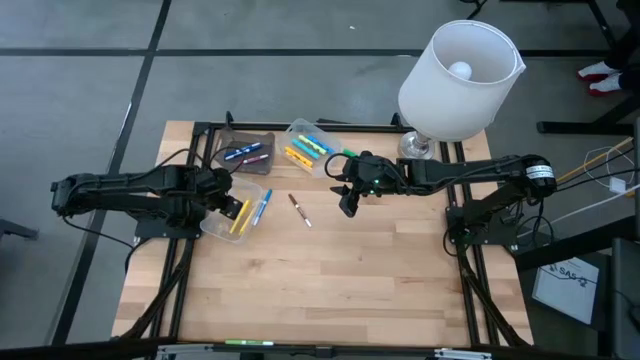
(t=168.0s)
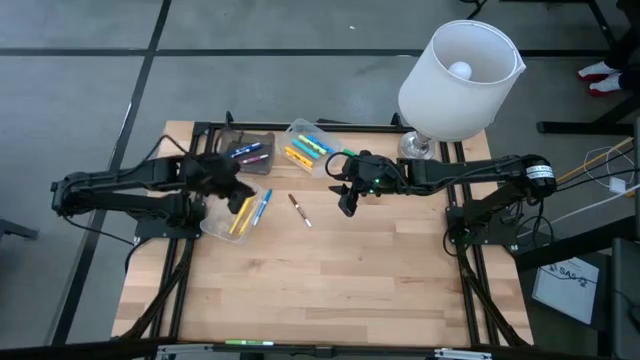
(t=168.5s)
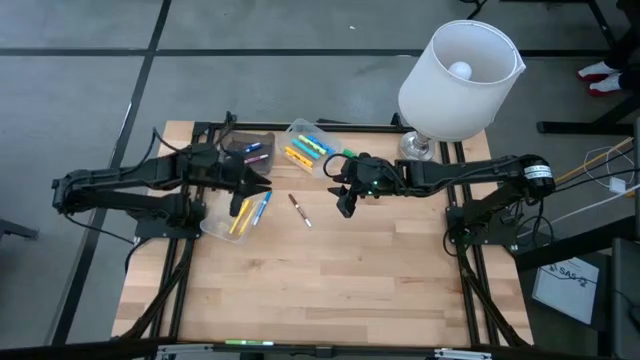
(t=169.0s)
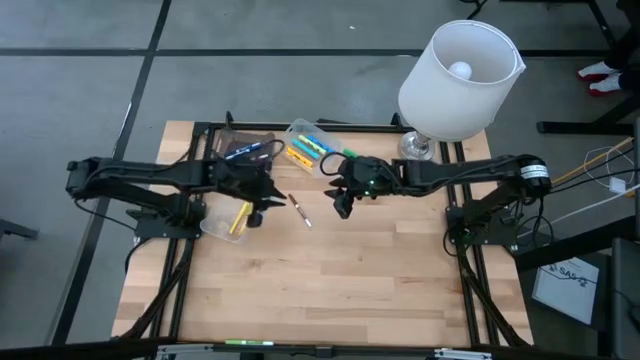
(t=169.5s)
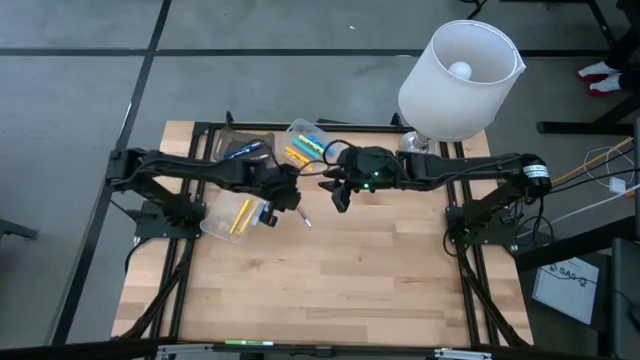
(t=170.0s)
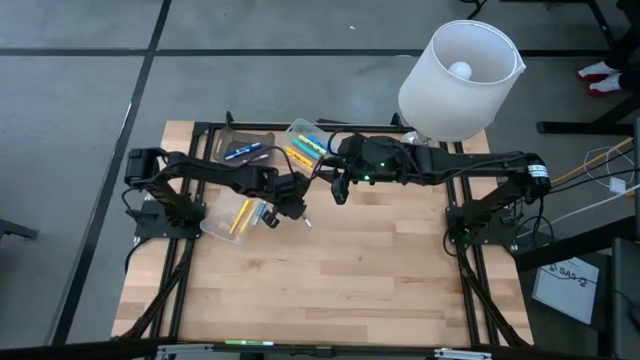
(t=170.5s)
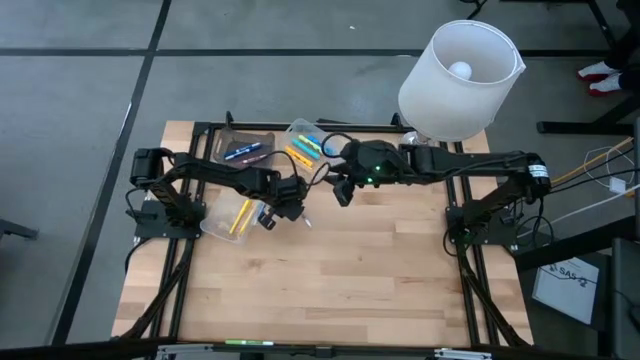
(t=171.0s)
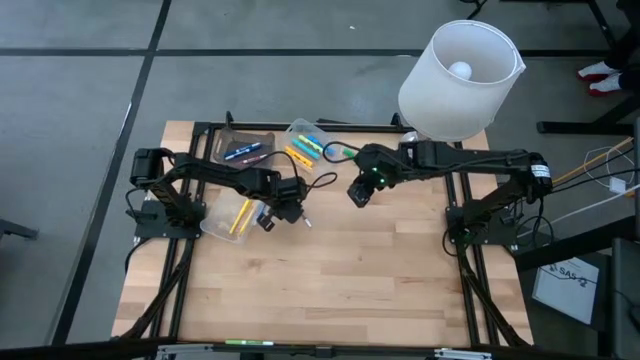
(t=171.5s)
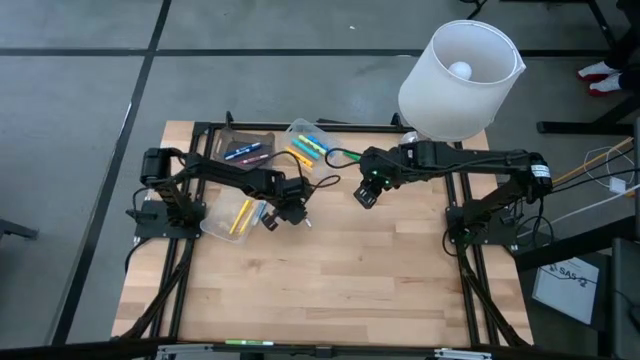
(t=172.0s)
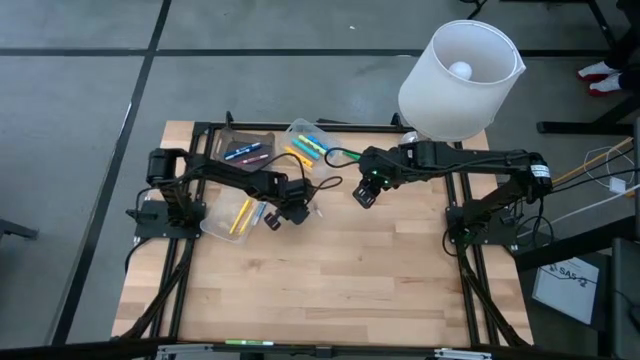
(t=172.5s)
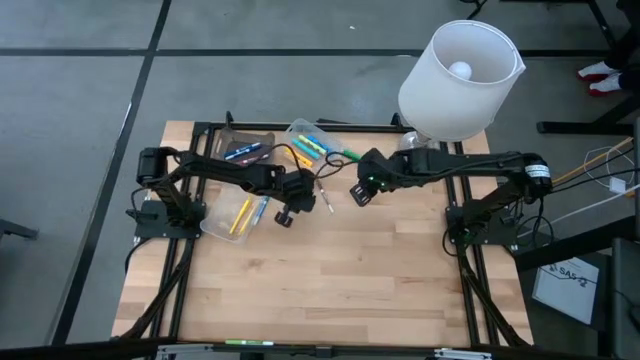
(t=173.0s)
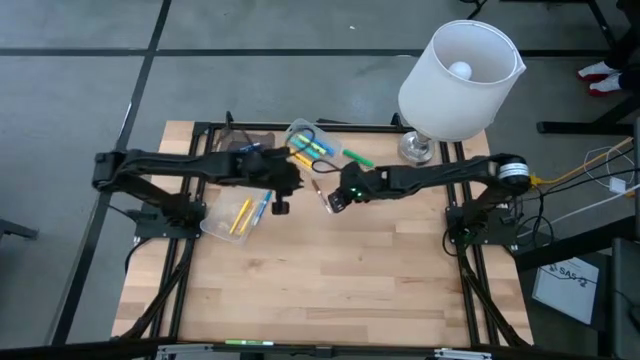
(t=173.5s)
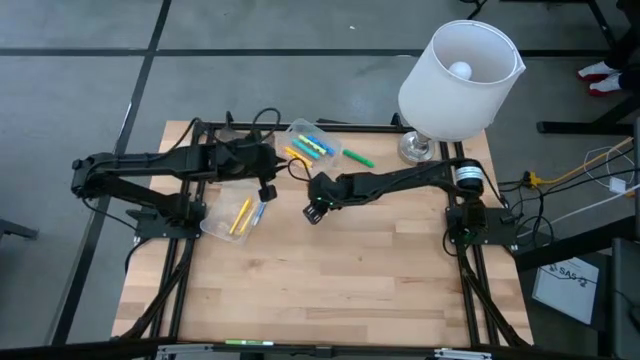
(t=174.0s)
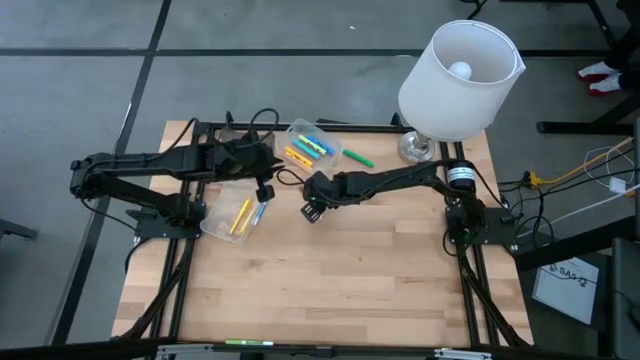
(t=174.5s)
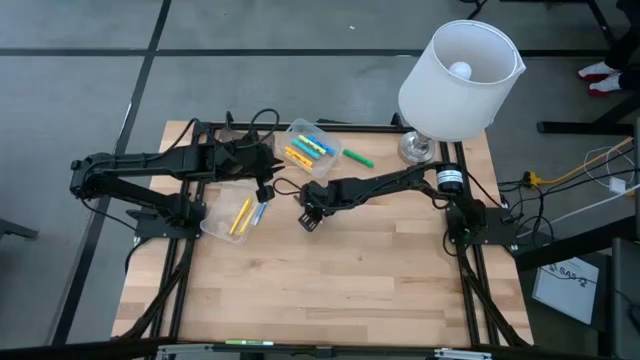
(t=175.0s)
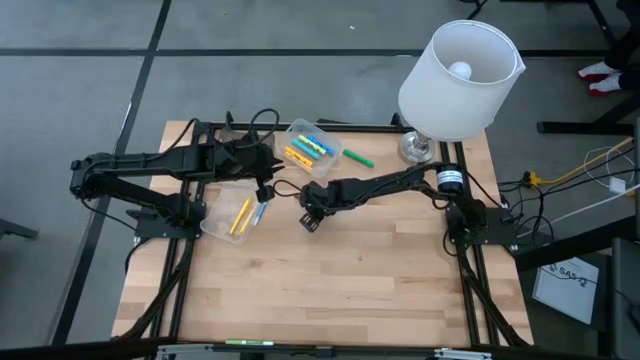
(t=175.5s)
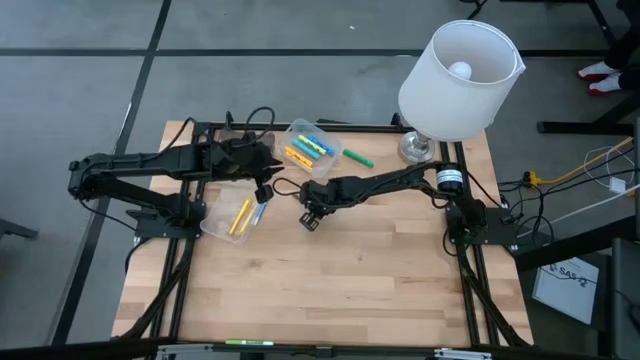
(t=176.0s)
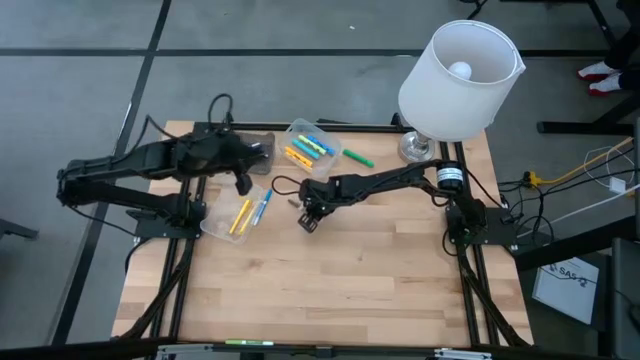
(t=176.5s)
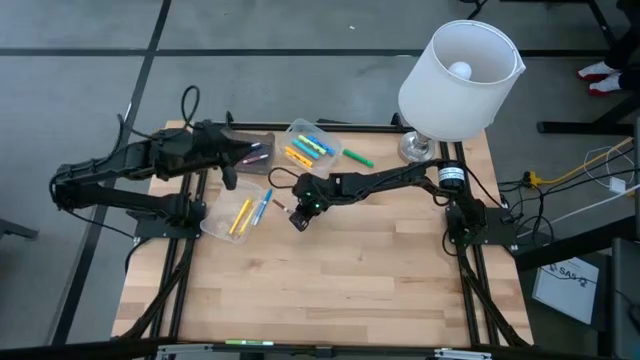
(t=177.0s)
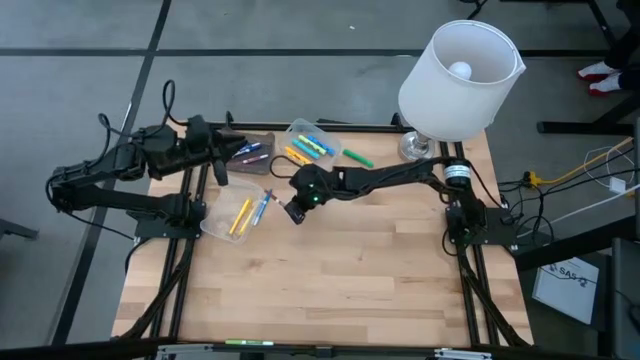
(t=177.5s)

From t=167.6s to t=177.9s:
Task: Pick & Place Markers
Put the brown marker into the black bin

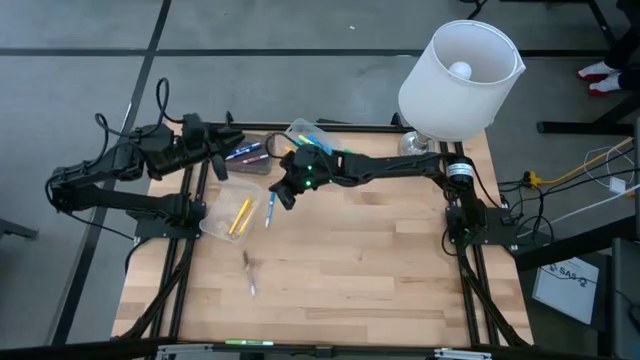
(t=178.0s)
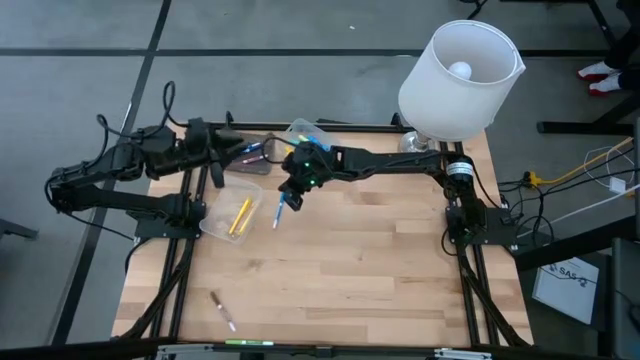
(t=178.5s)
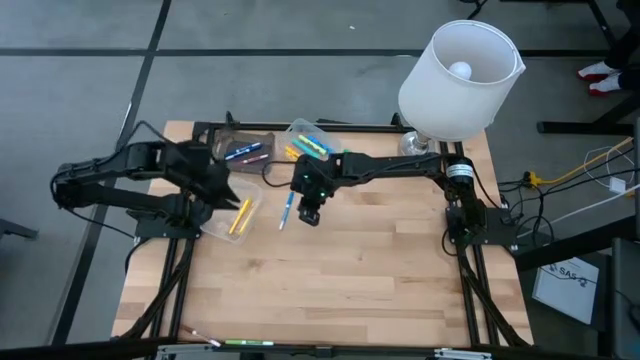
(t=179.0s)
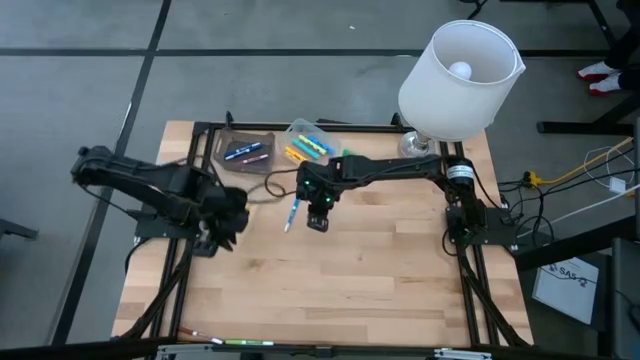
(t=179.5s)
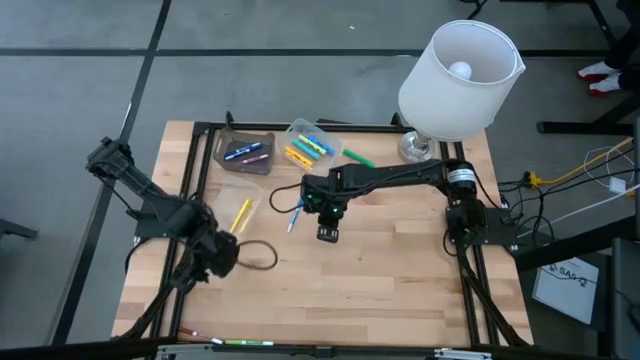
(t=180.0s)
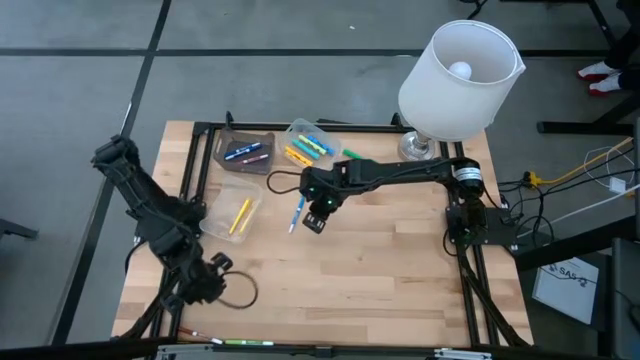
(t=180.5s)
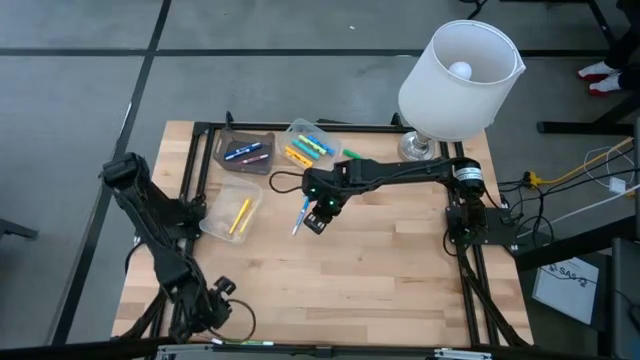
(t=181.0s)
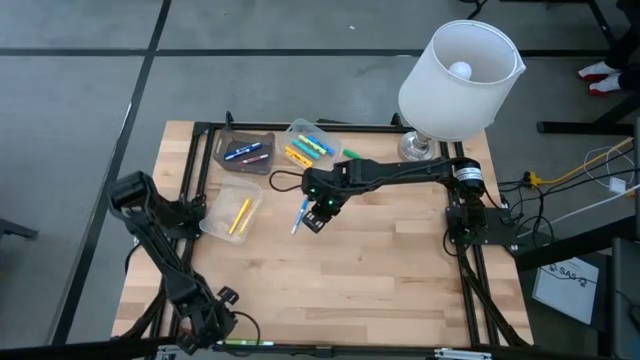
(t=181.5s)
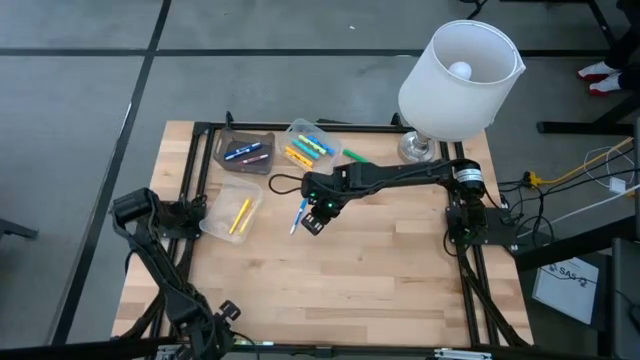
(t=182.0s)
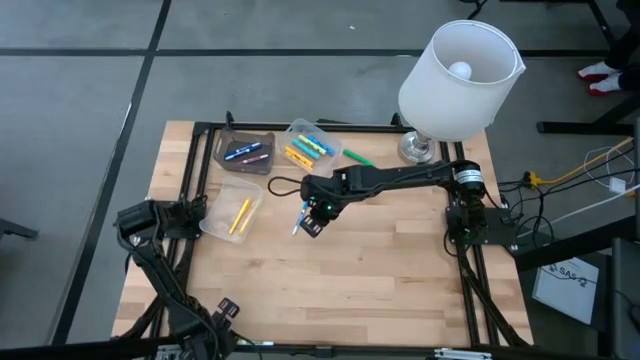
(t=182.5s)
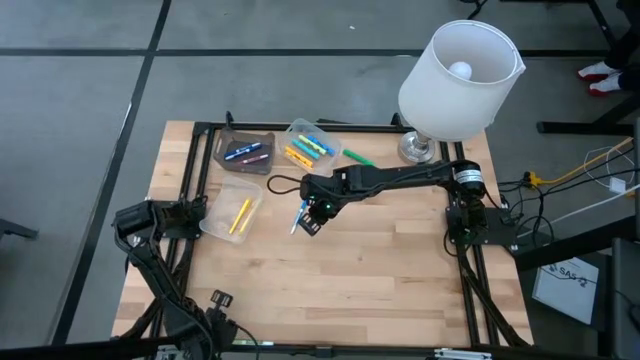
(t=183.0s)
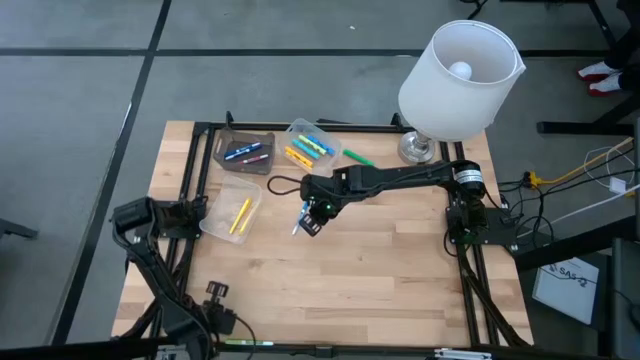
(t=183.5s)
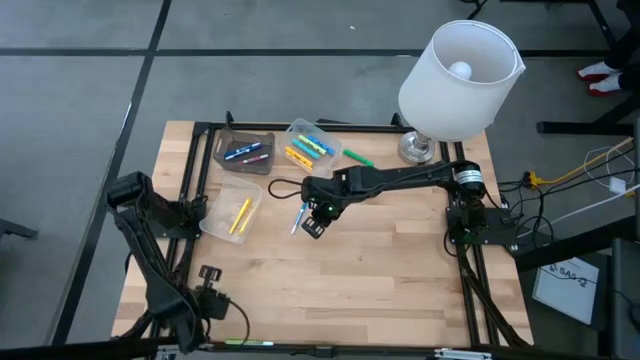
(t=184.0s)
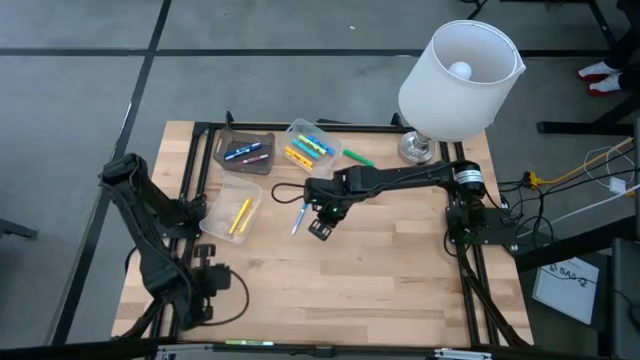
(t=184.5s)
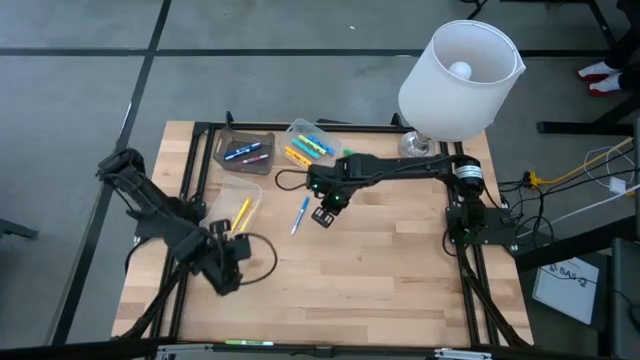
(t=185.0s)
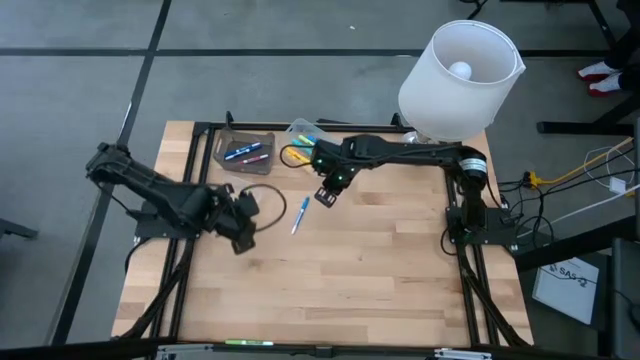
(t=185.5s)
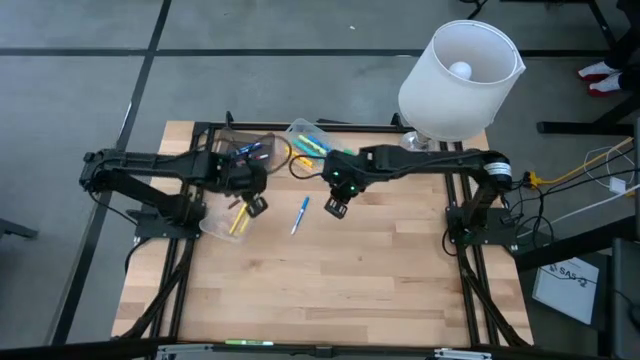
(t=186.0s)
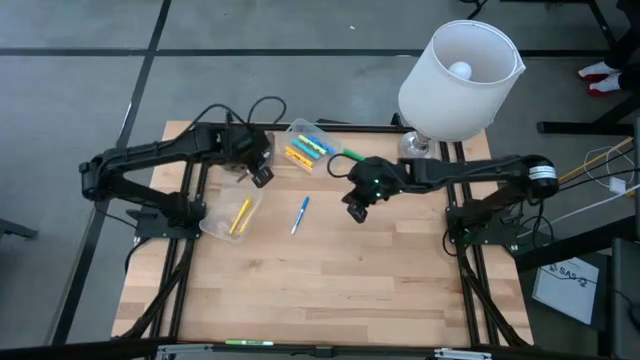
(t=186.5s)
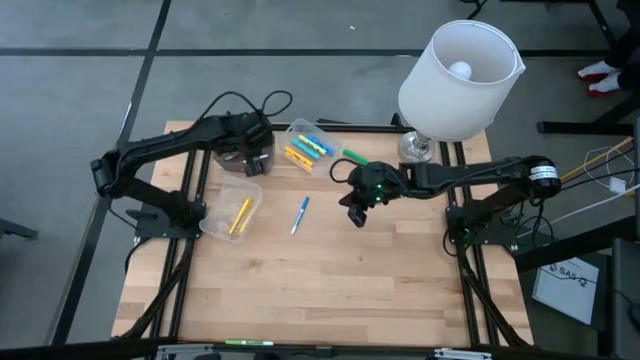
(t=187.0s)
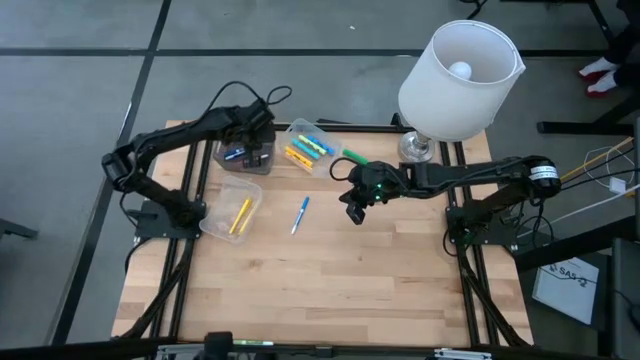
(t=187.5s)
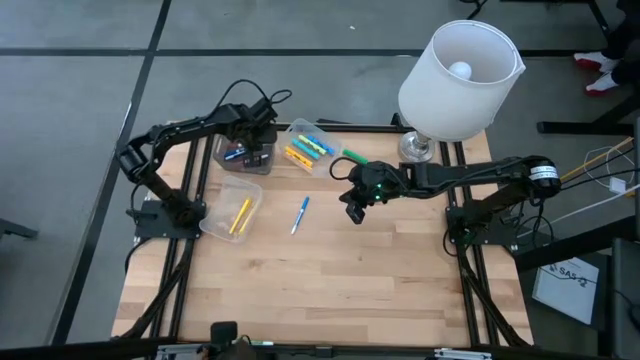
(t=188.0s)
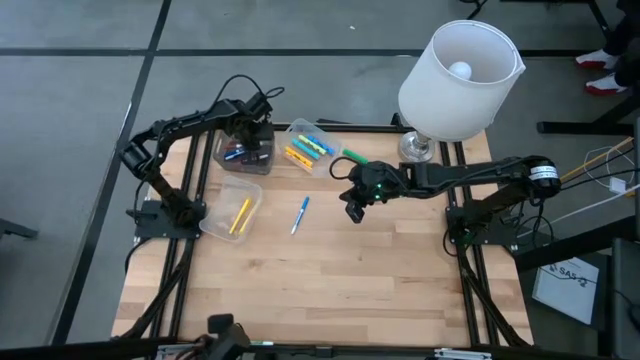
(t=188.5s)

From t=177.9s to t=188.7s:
Put the brown marker into the black bin
